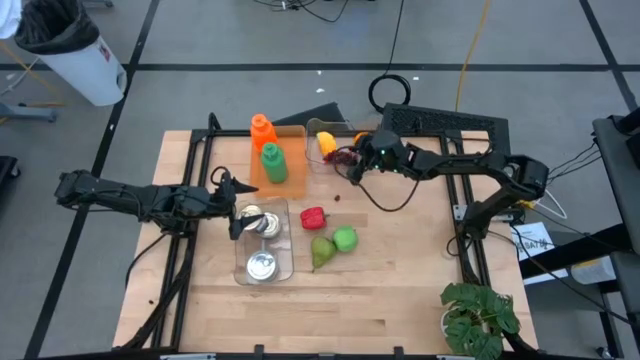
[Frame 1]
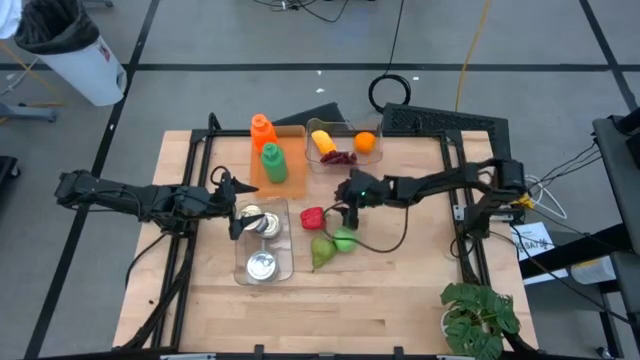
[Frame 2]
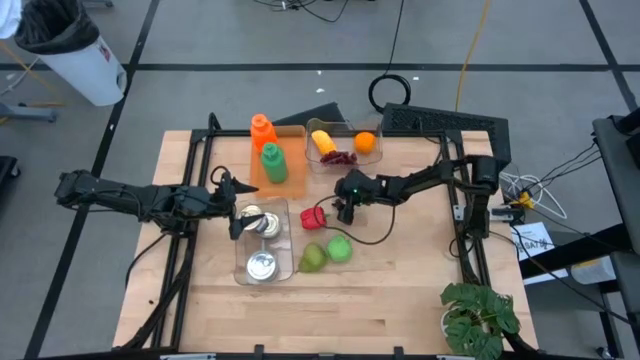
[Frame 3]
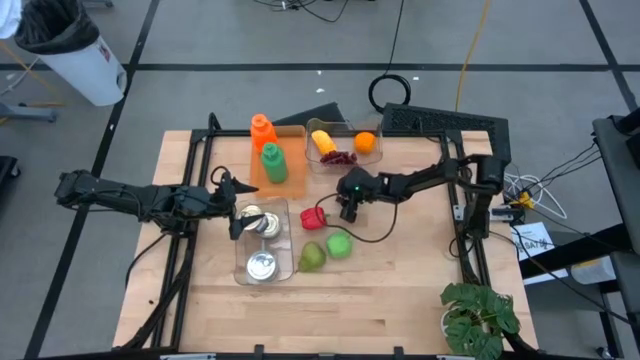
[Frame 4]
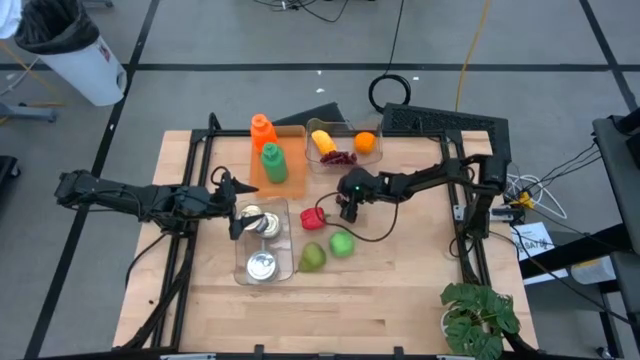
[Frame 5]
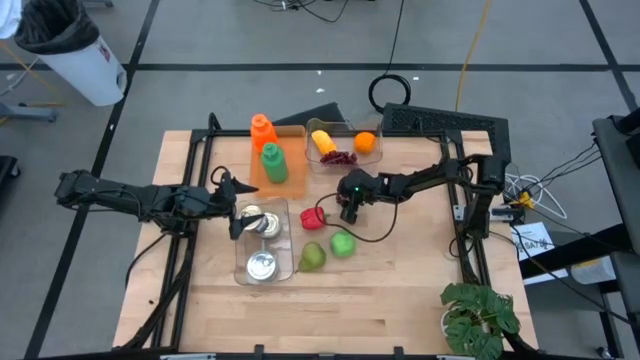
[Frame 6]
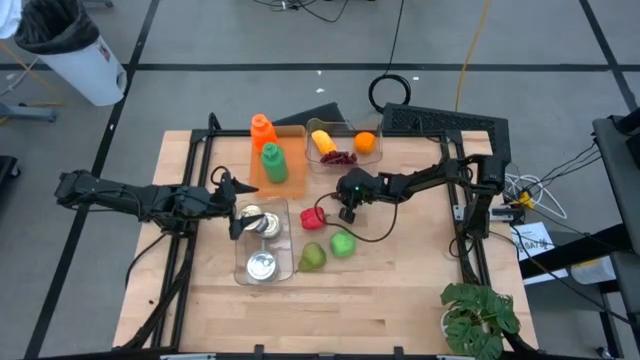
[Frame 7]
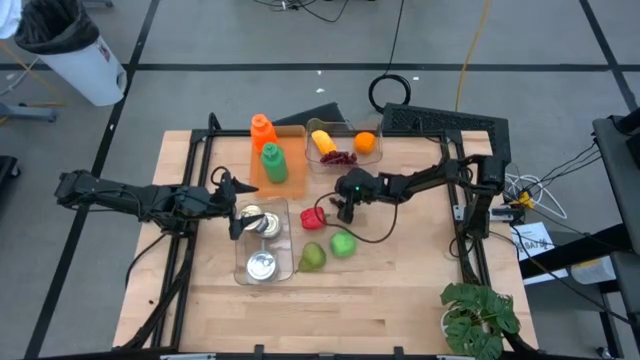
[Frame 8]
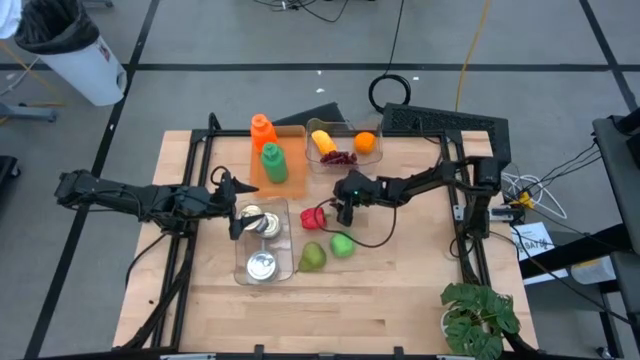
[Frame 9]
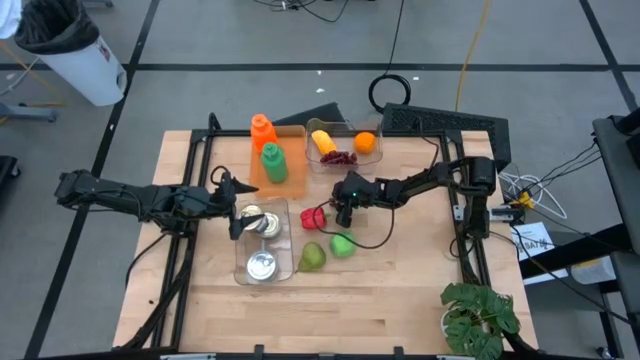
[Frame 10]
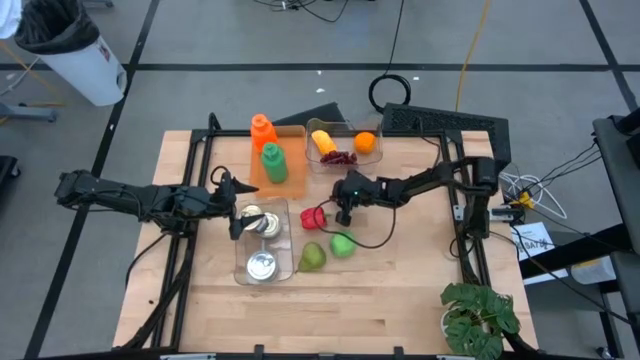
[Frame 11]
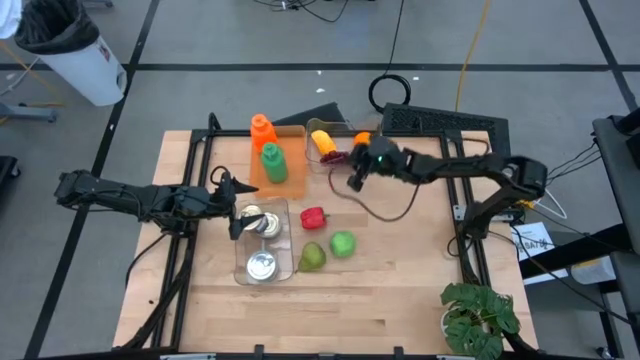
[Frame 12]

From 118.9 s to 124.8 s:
Task: Pick & Place Food Item
Put the red grape into the top transparent bin

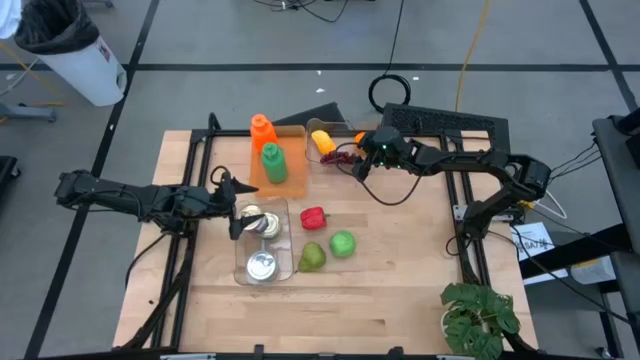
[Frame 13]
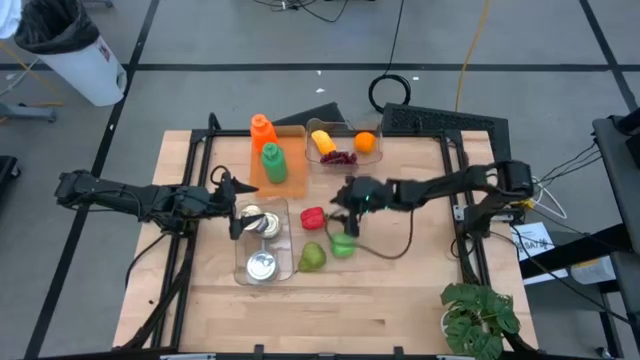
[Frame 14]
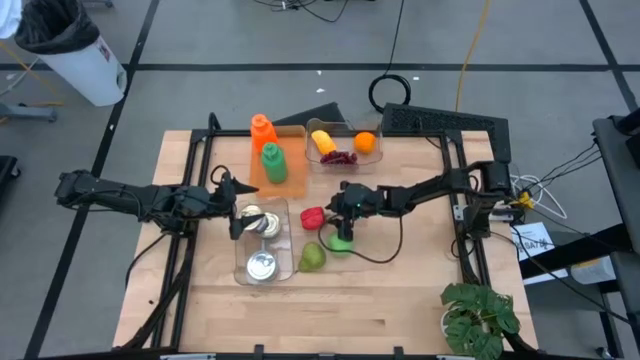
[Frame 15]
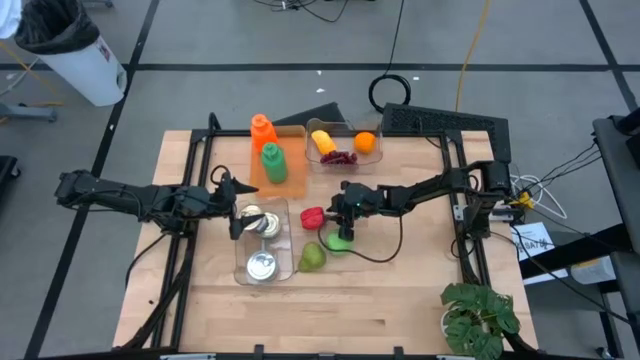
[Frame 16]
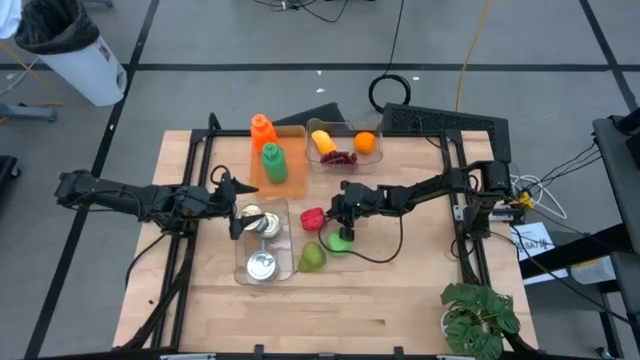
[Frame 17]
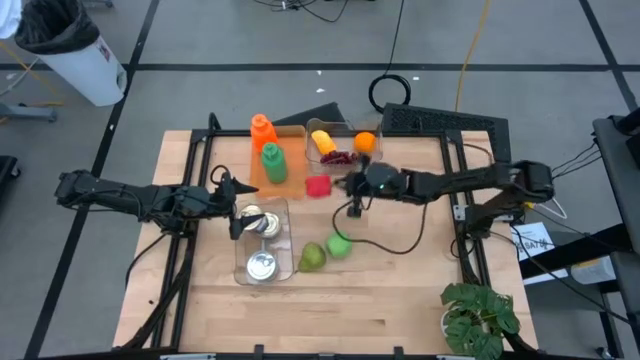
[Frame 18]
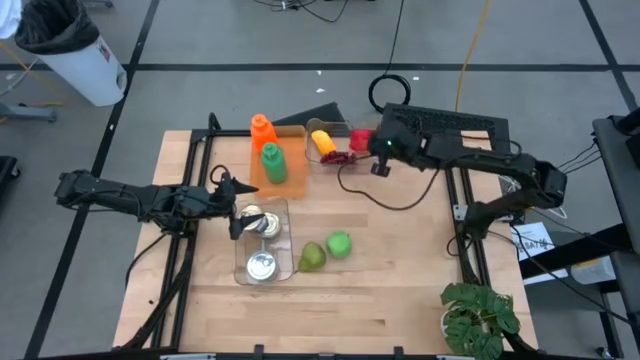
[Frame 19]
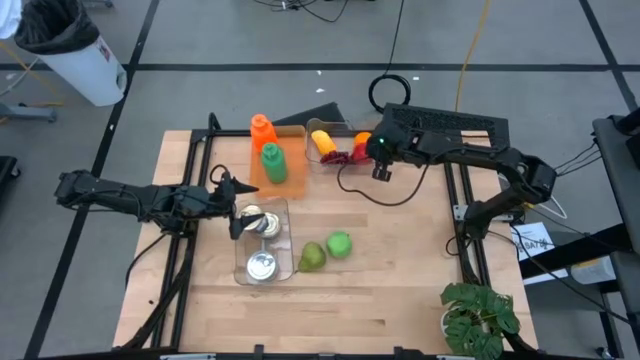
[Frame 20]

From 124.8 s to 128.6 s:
Put the red and green bell peppers into the top transparent bin

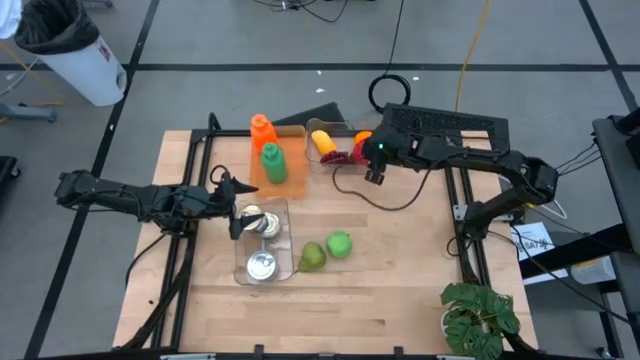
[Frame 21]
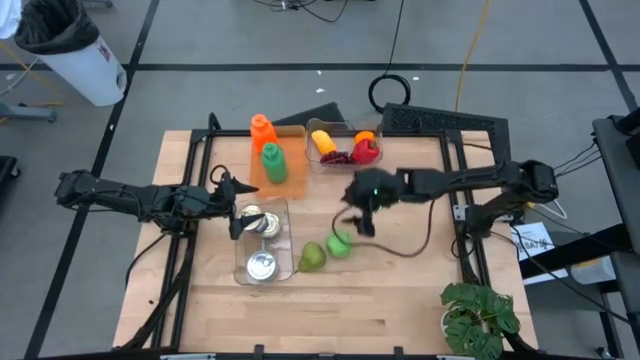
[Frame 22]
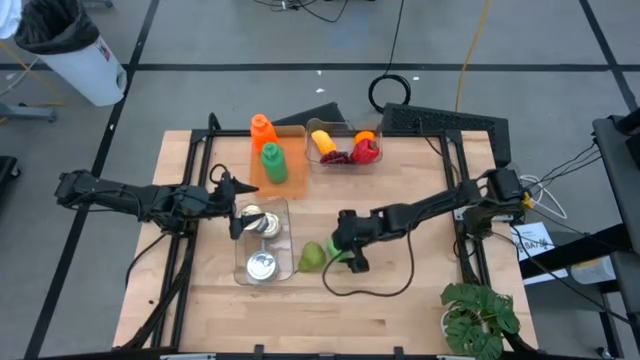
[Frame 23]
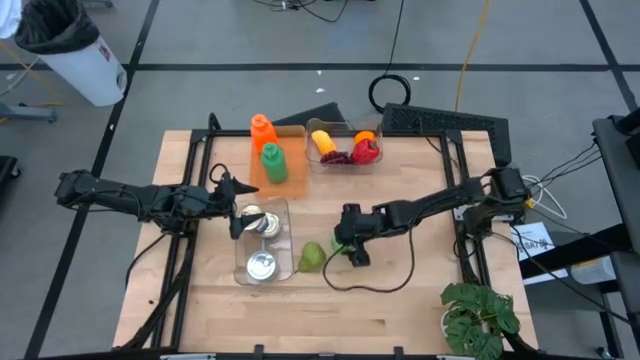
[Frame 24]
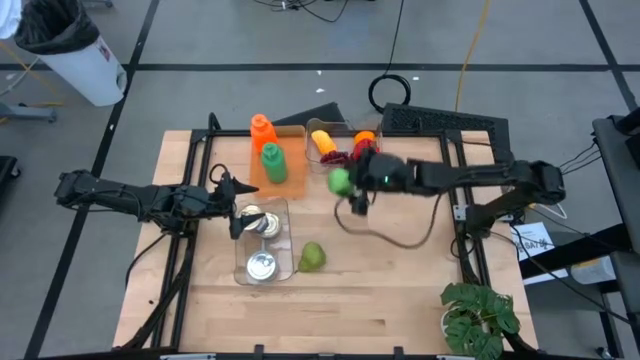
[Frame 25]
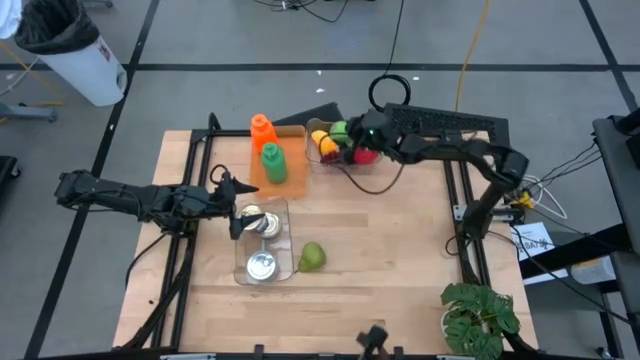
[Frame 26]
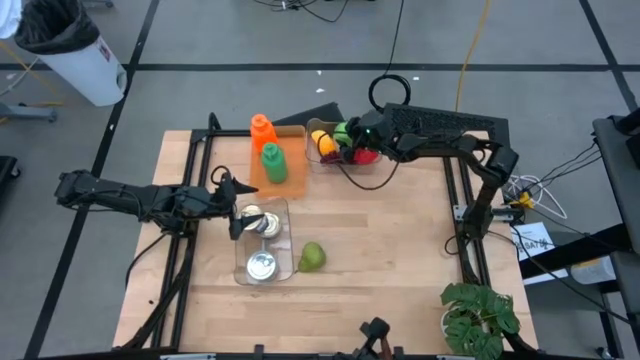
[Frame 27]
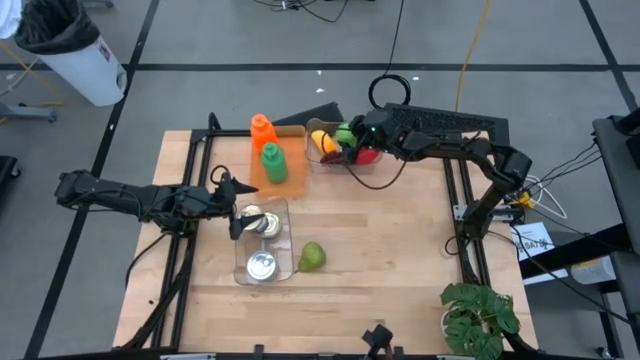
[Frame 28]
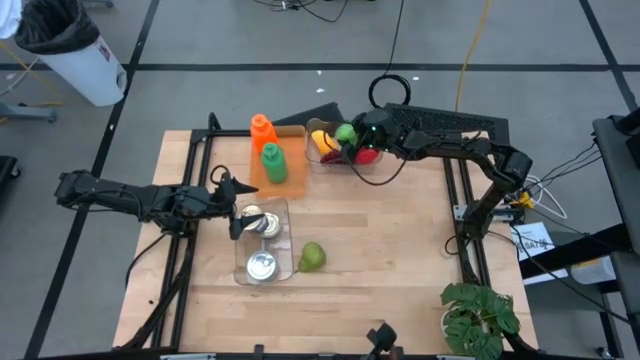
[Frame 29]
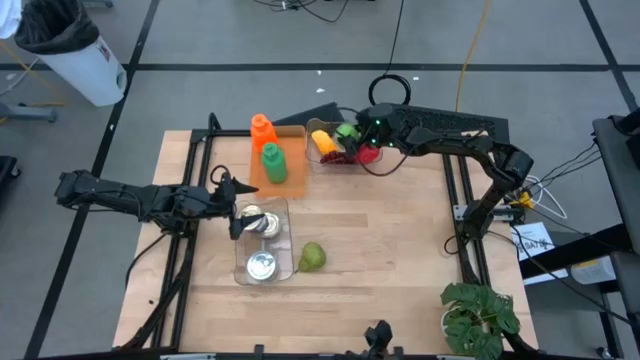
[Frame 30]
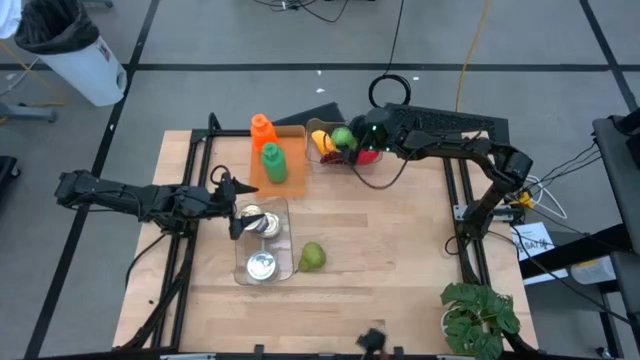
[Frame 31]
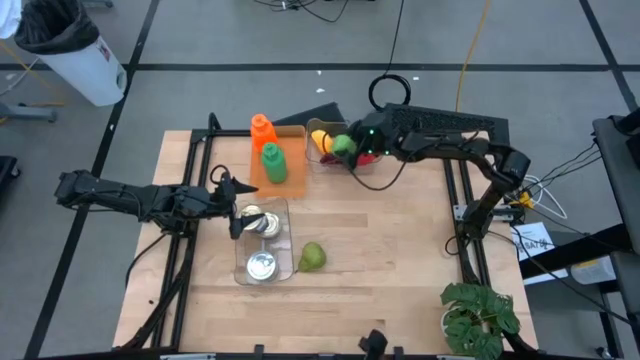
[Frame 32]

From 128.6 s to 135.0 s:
Put the green apple into the top transparent bin

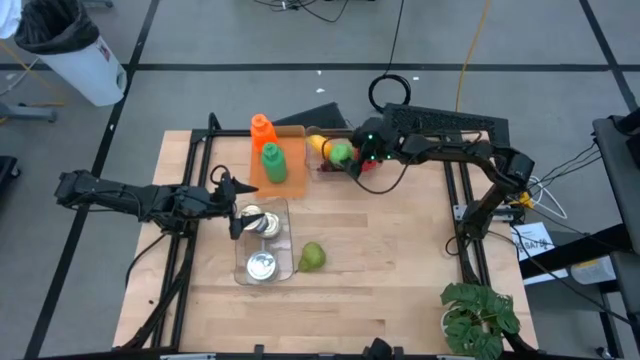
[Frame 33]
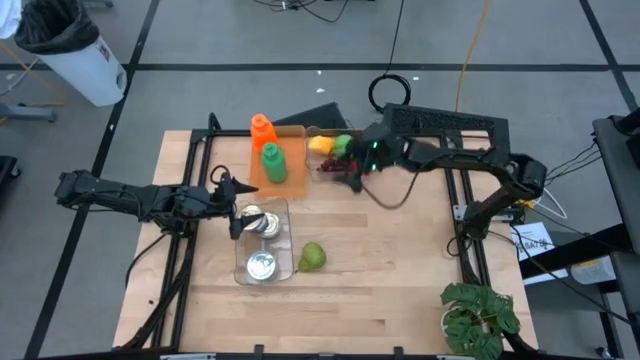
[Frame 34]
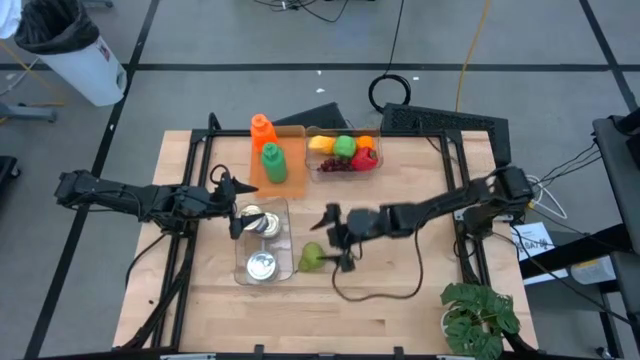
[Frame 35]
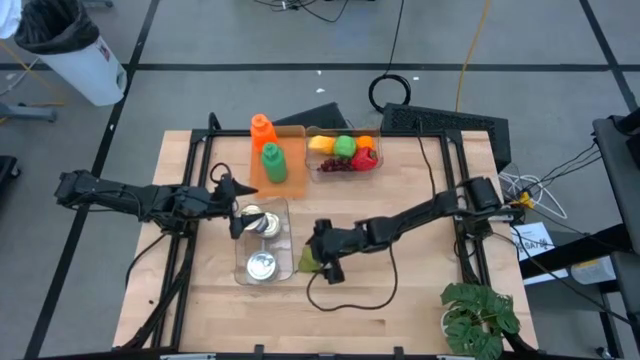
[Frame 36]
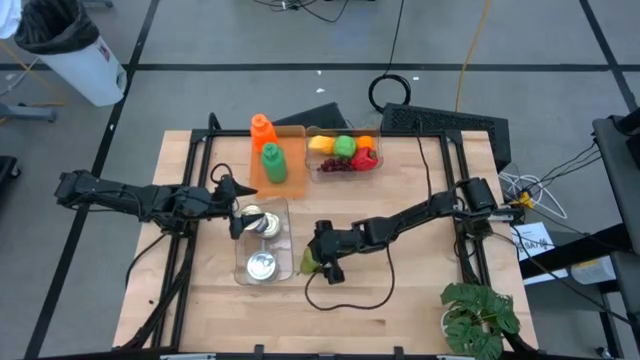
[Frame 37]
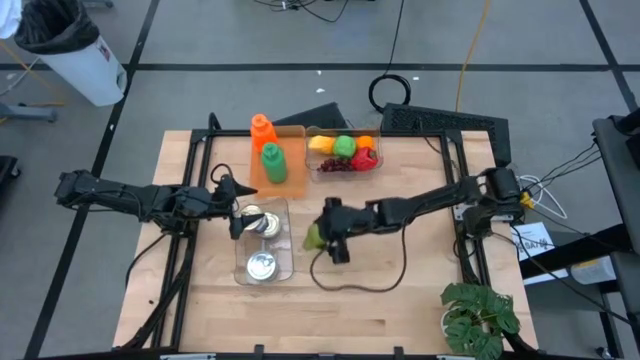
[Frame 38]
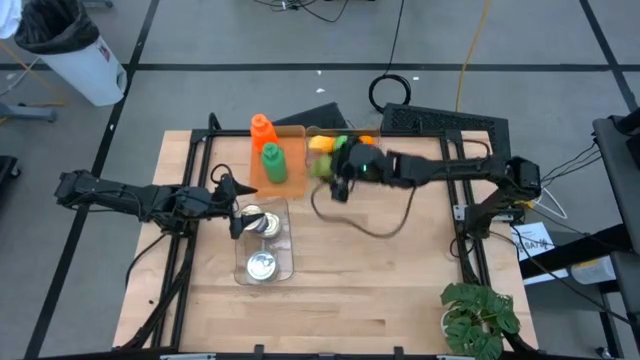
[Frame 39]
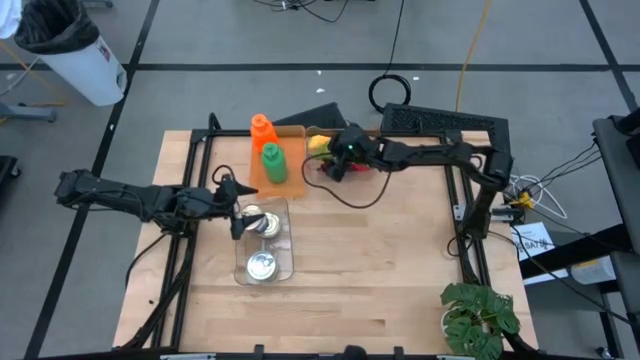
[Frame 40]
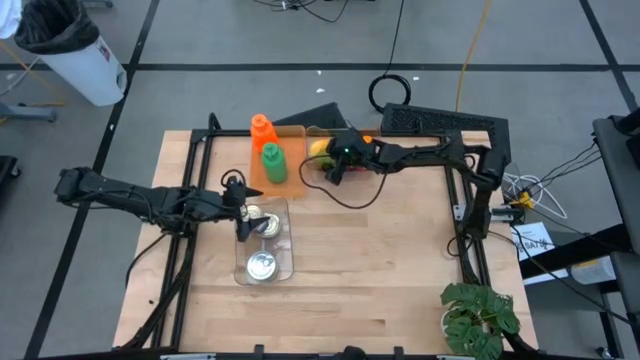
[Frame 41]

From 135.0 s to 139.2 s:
Put the green pear into the top transparent bin
